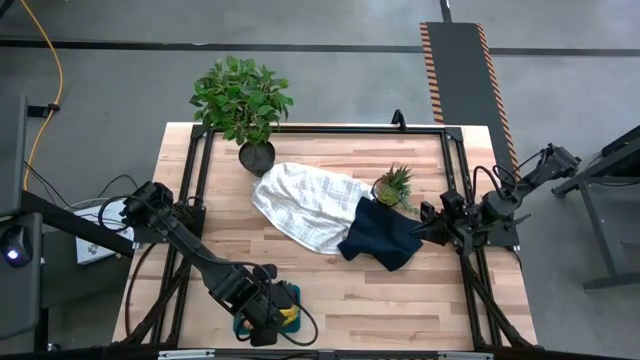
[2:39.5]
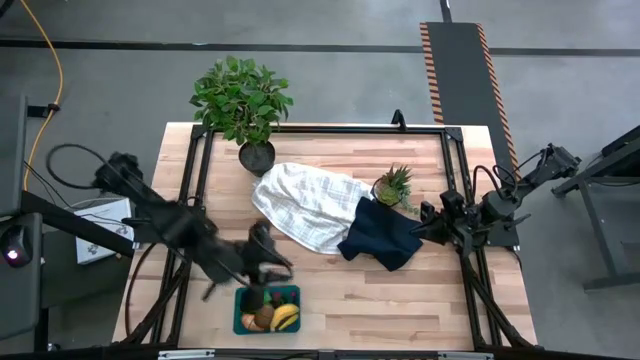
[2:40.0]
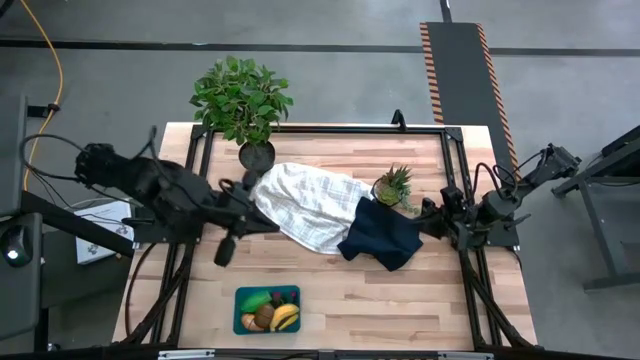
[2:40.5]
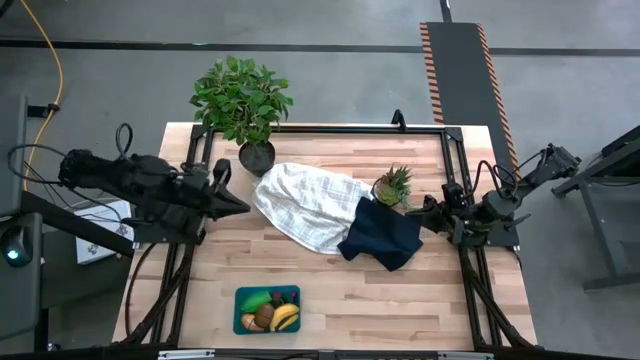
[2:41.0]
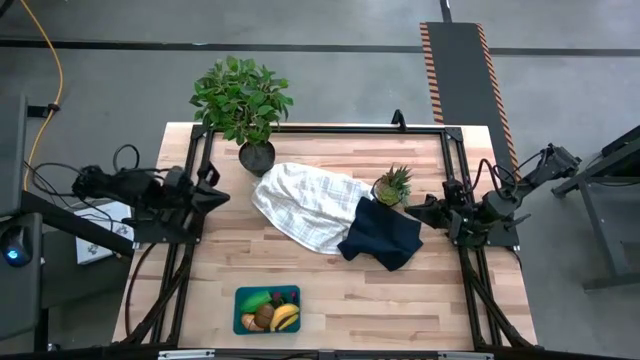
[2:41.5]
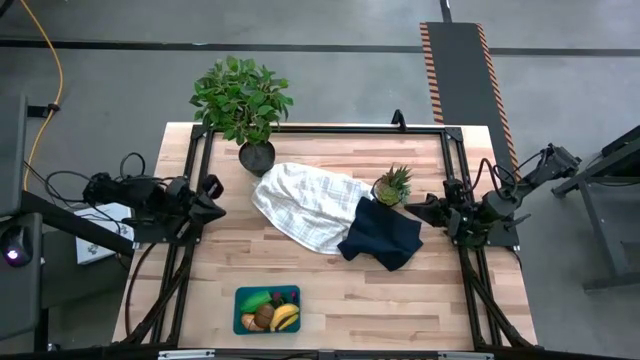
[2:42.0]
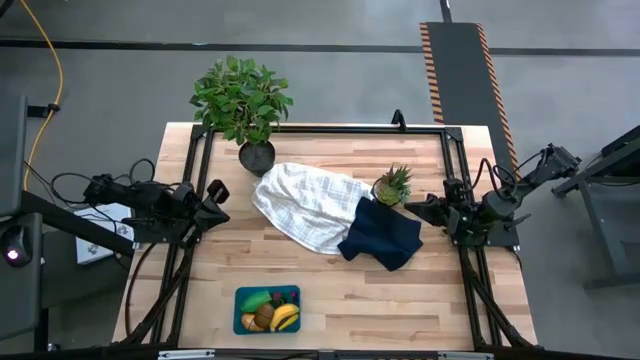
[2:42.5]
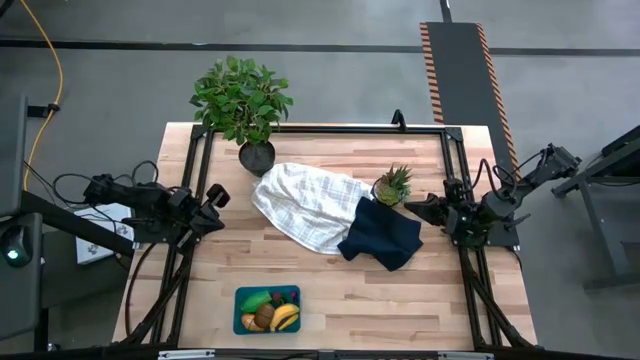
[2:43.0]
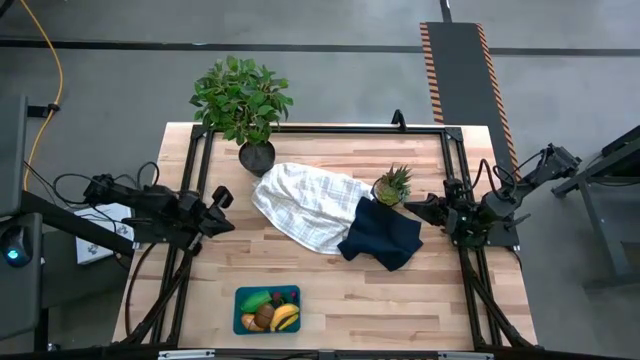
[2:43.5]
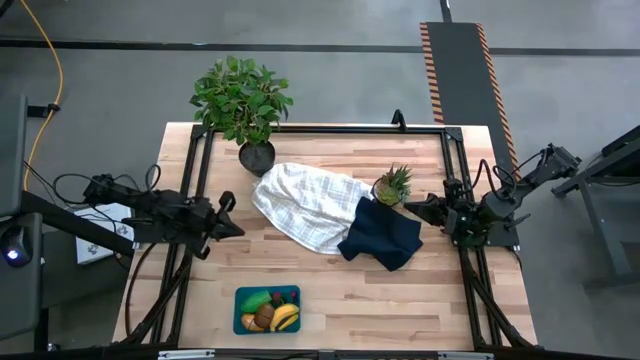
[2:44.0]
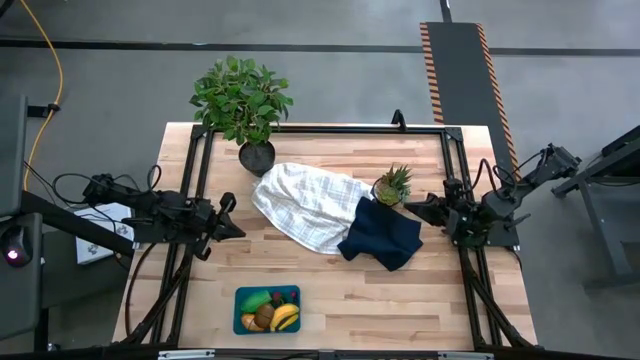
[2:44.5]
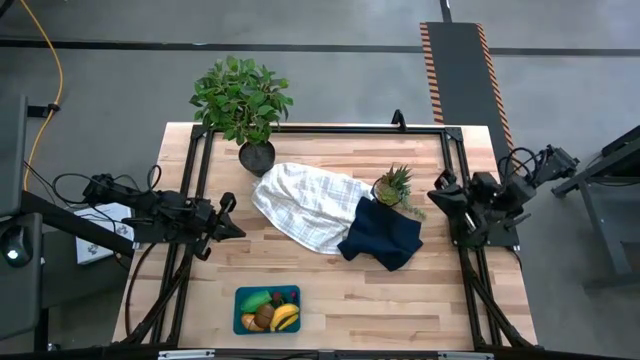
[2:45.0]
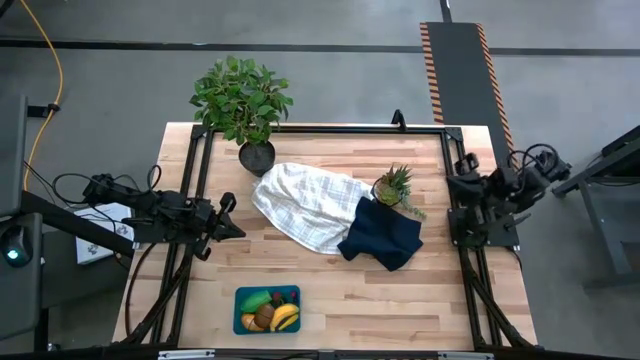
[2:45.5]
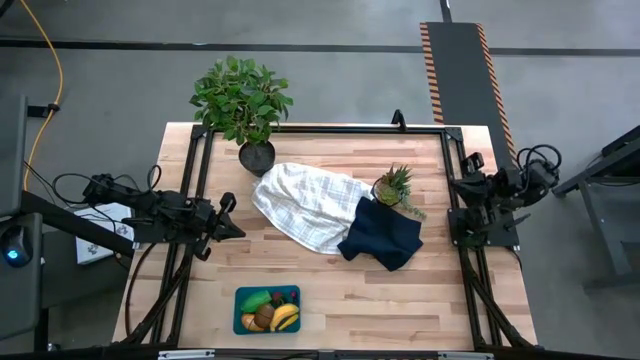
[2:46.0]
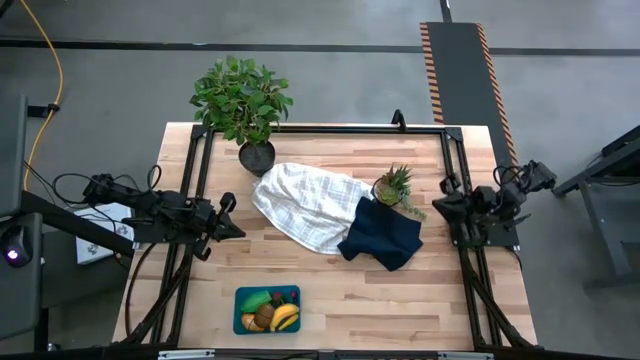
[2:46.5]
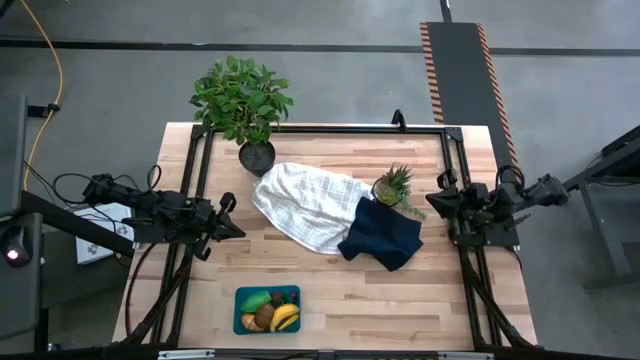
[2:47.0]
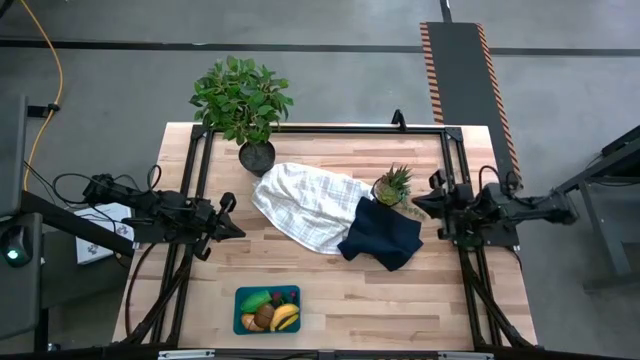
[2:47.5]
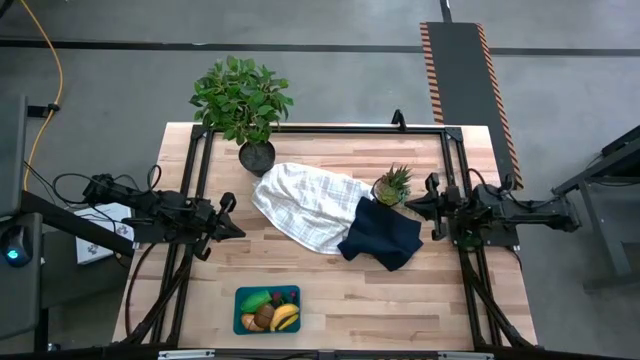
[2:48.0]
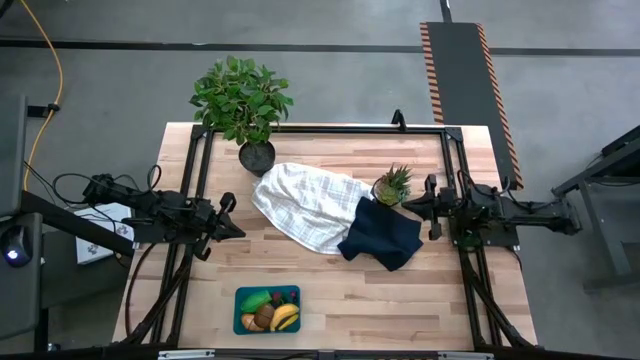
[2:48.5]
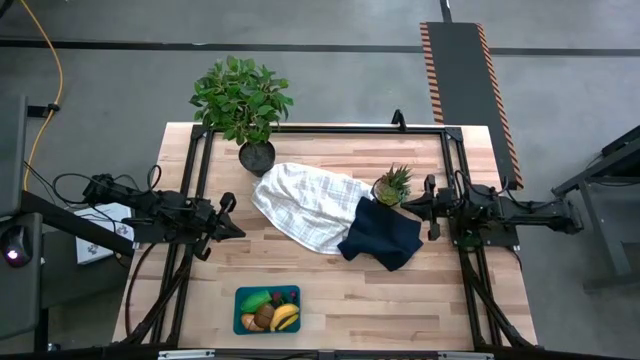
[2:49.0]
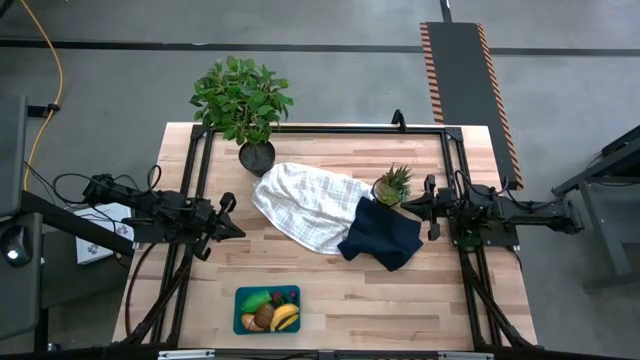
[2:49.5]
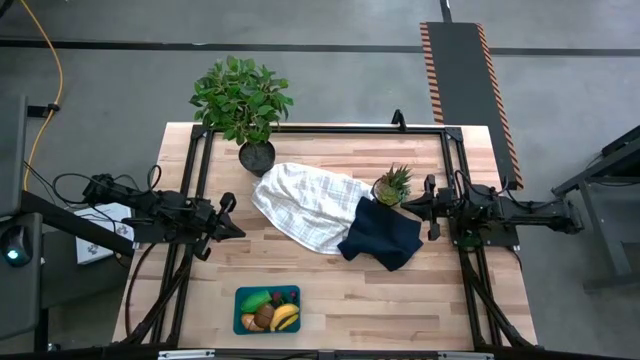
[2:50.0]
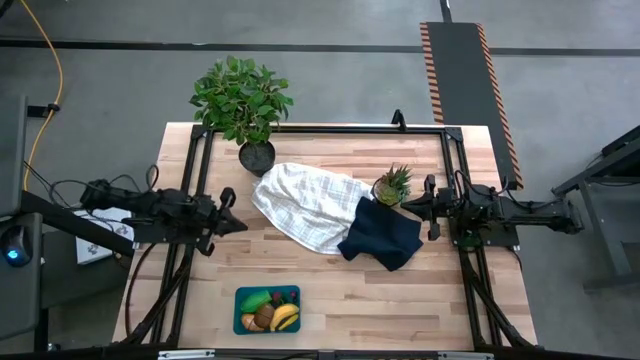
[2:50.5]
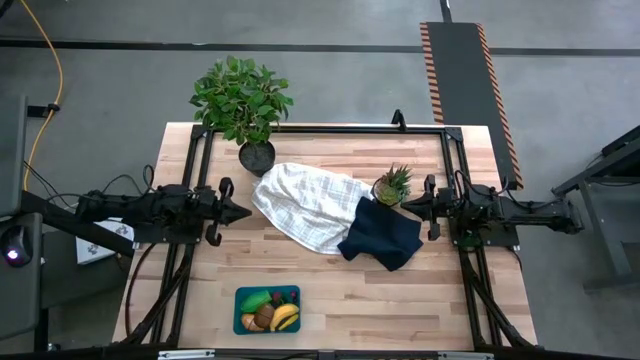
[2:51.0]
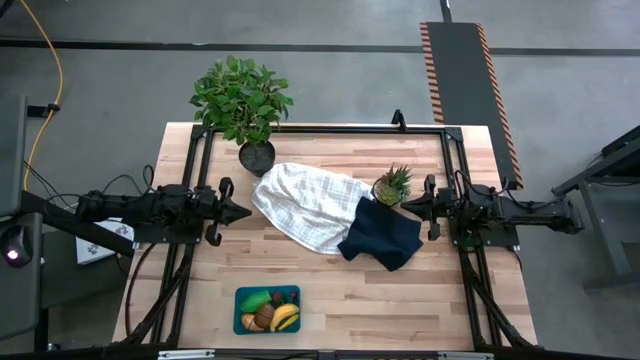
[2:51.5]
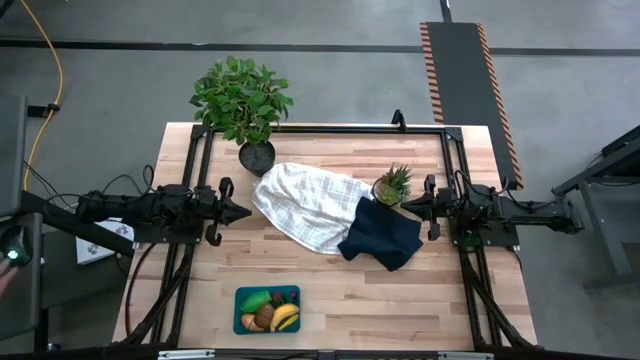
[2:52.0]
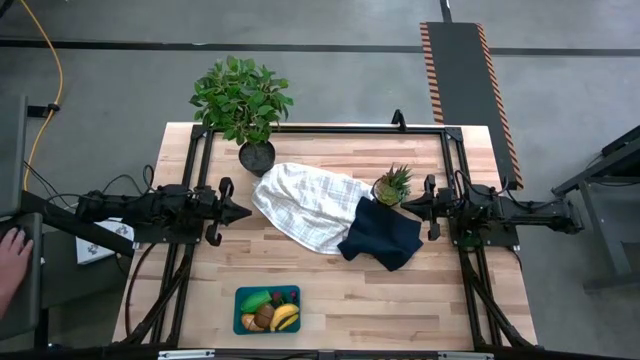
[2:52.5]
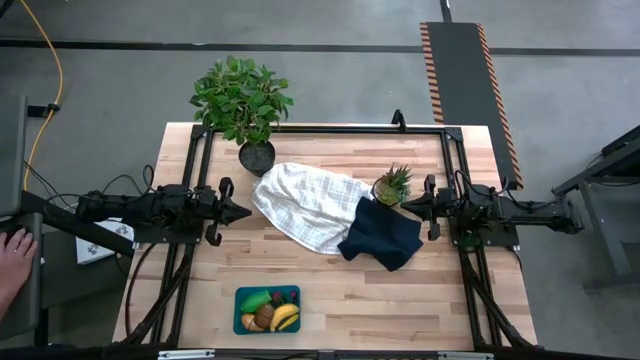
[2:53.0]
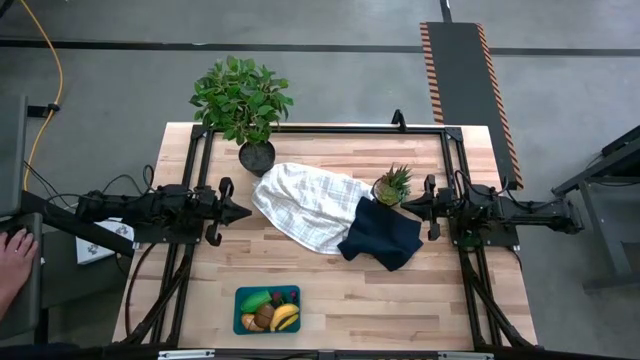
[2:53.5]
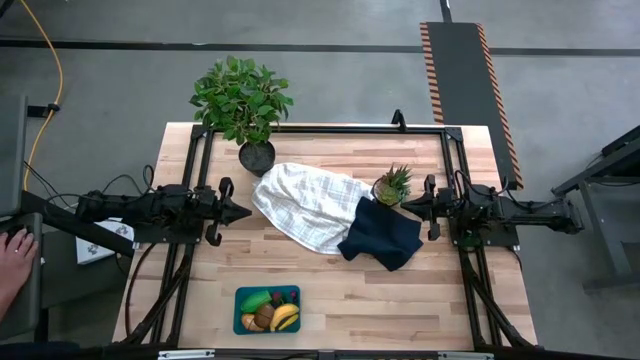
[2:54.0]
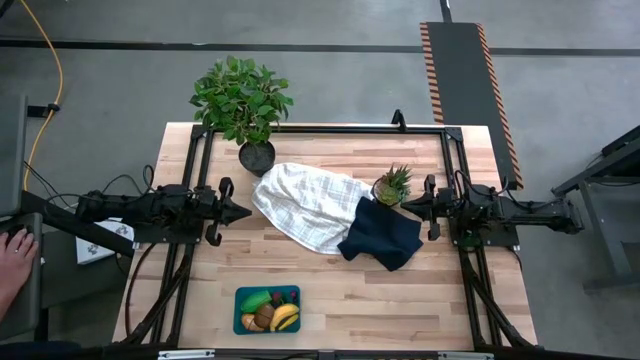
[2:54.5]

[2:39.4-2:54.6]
Task: Pick and placing Produce into tupperware
Return to Home Position

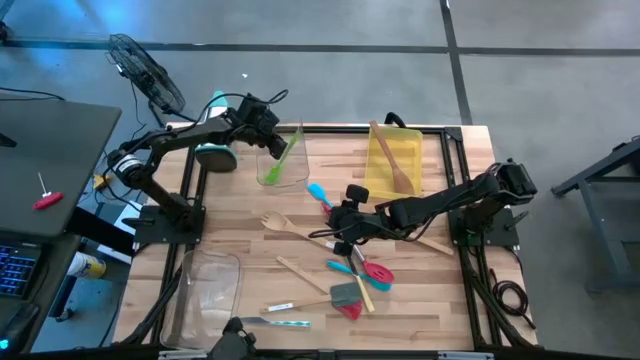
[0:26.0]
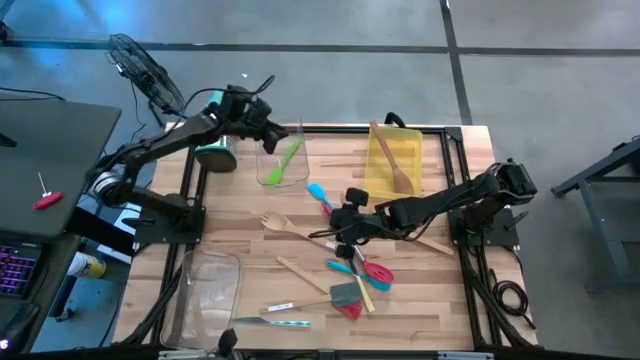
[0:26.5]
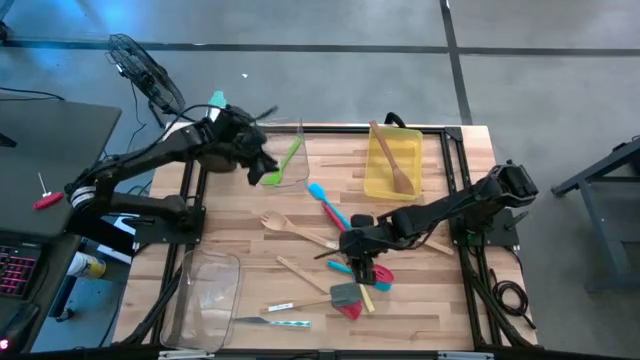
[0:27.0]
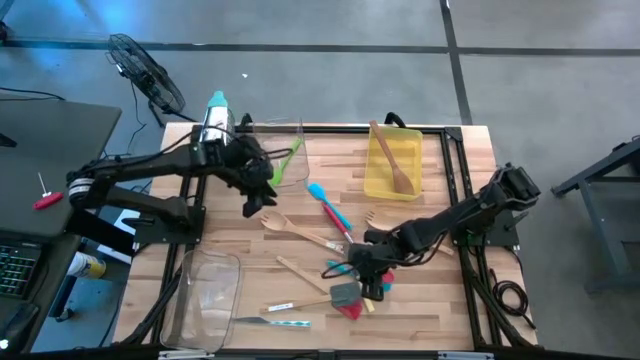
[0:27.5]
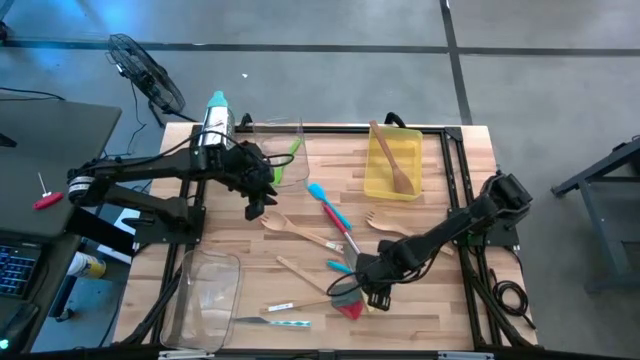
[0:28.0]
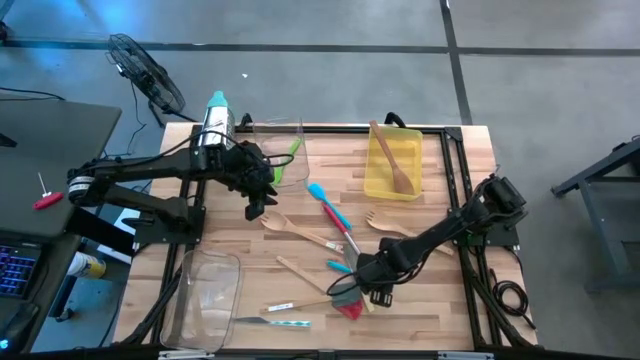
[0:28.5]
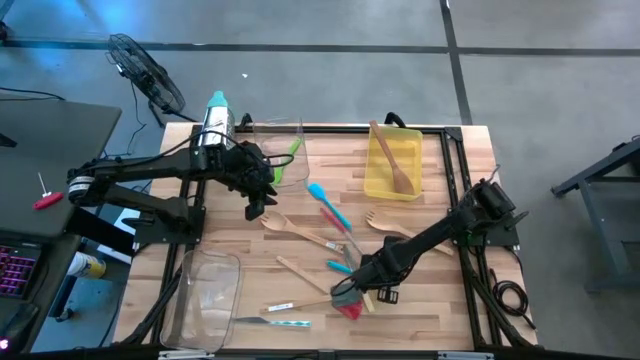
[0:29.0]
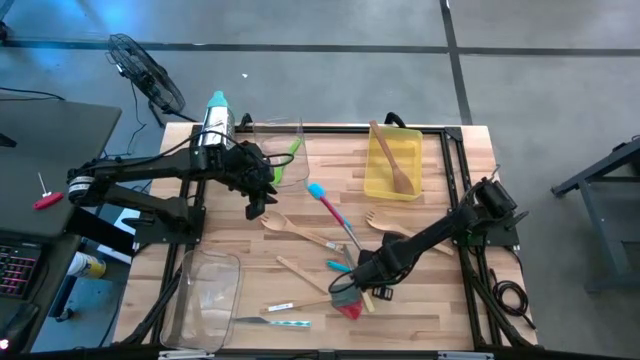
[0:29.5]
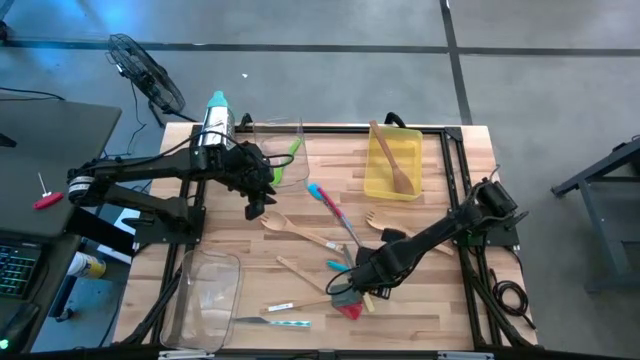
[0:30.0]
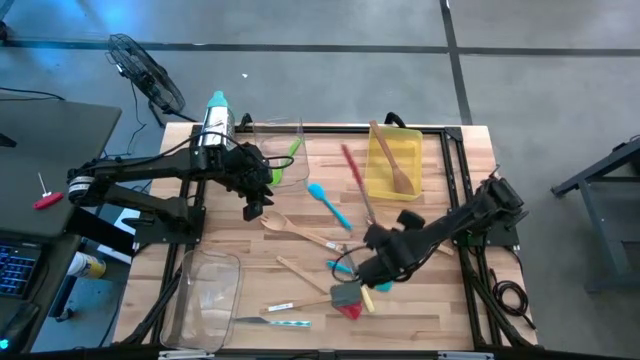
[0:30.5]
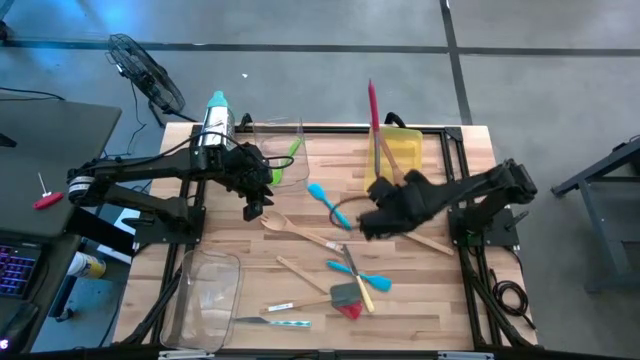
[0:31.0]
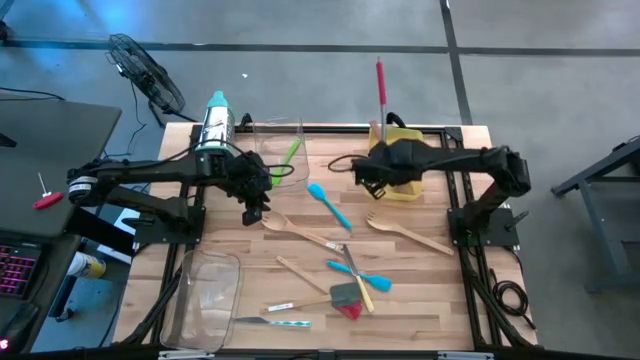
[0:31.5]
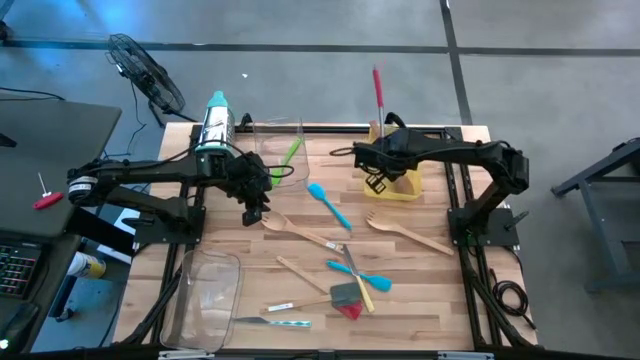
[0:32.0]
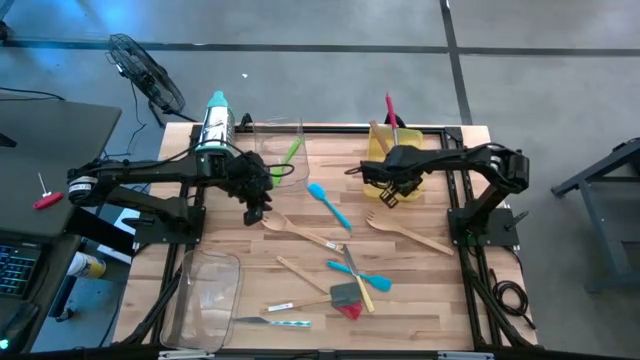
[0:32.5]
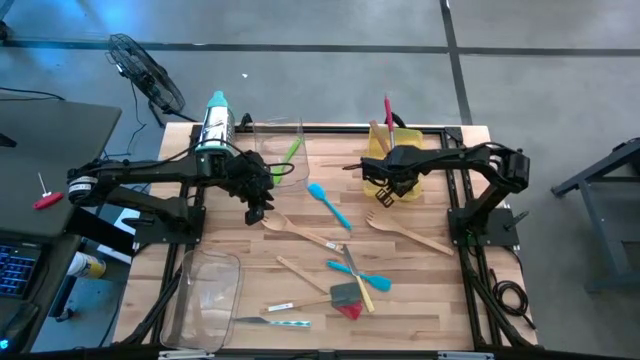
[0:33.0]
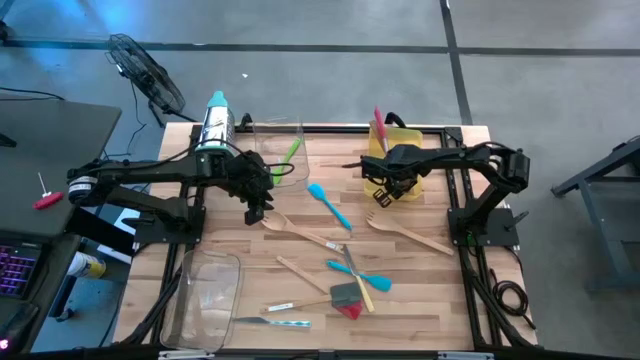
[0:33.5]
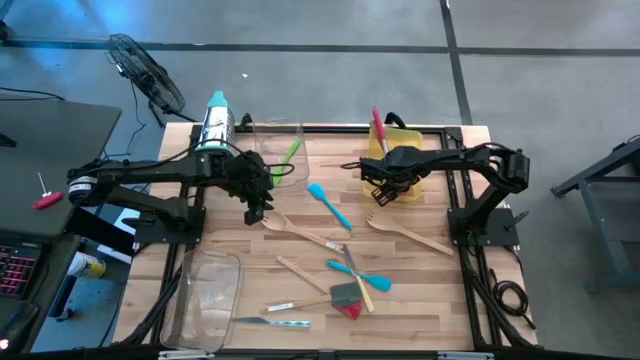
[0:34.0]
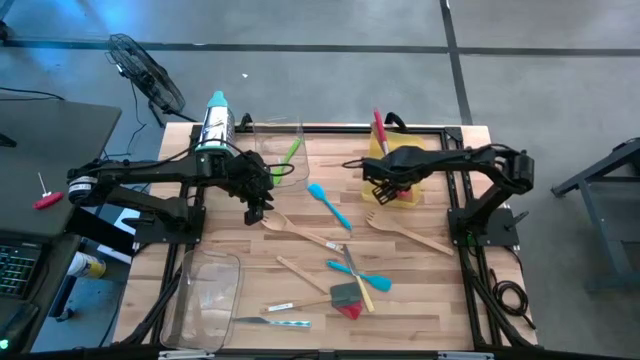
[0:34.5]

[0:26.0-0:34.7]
Task: Pick & Place Kitchen Items
Put the red serving spoon into the yellow bin
